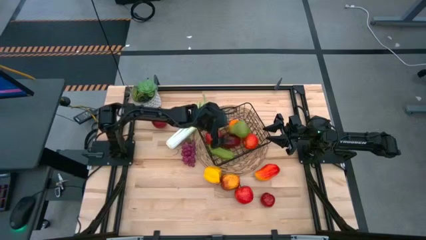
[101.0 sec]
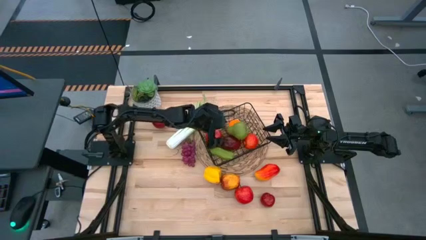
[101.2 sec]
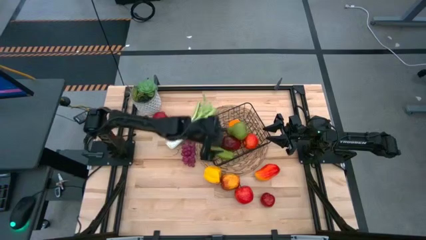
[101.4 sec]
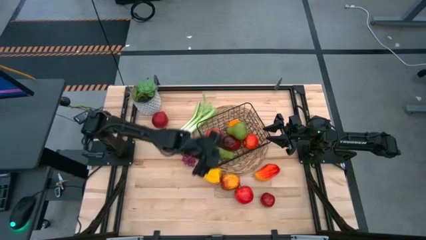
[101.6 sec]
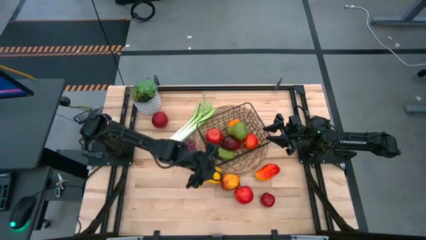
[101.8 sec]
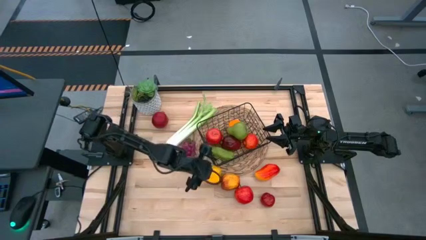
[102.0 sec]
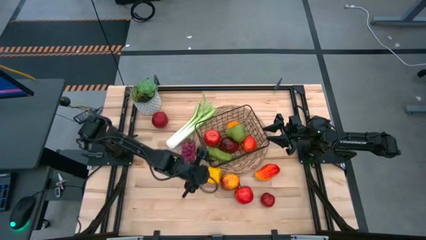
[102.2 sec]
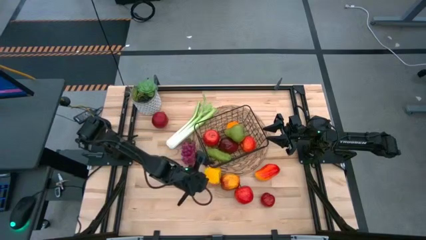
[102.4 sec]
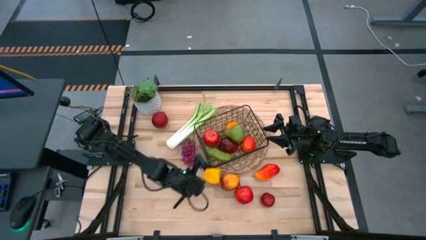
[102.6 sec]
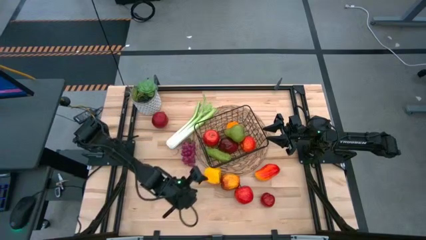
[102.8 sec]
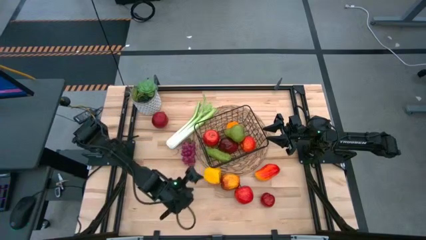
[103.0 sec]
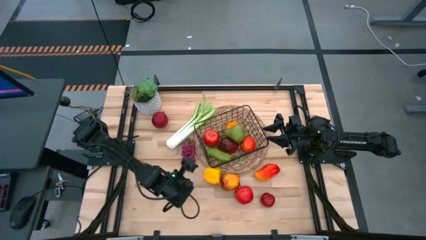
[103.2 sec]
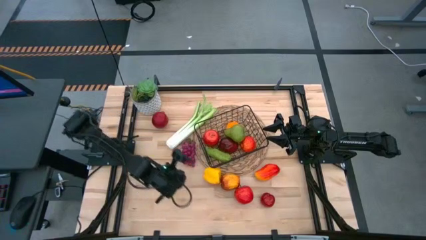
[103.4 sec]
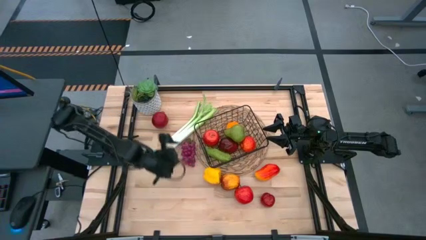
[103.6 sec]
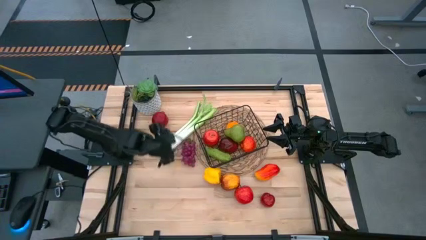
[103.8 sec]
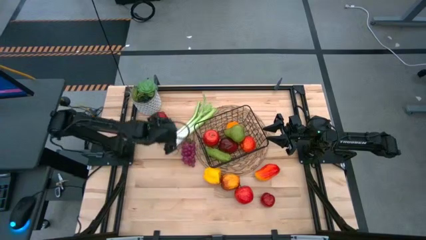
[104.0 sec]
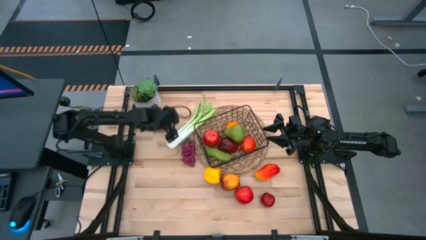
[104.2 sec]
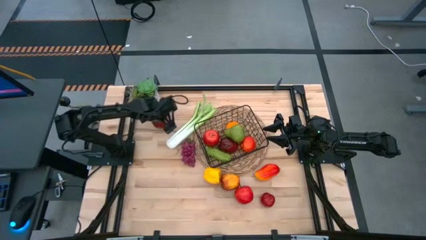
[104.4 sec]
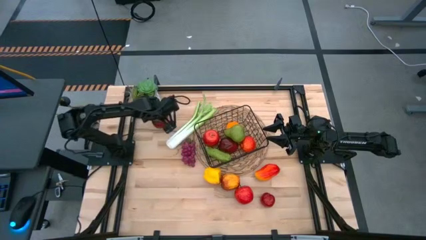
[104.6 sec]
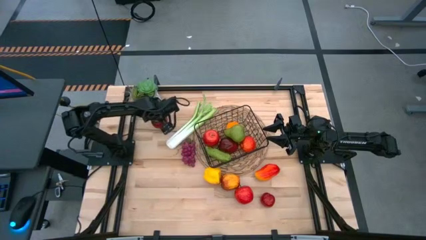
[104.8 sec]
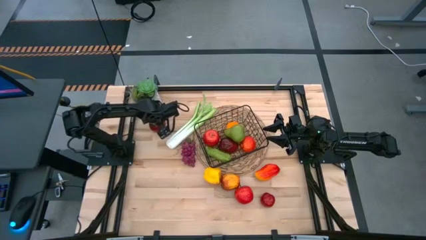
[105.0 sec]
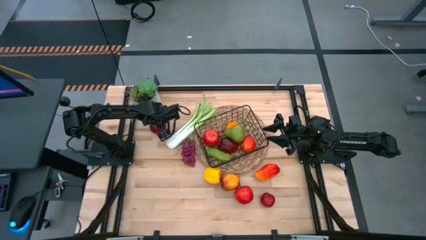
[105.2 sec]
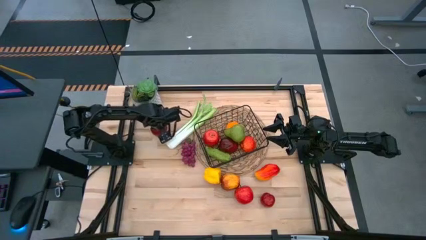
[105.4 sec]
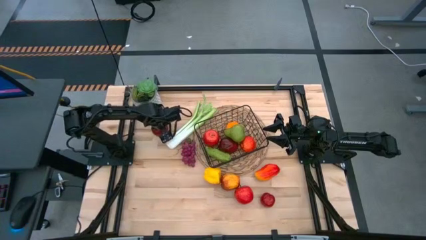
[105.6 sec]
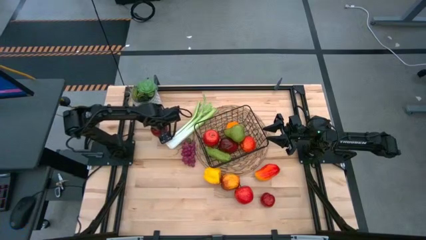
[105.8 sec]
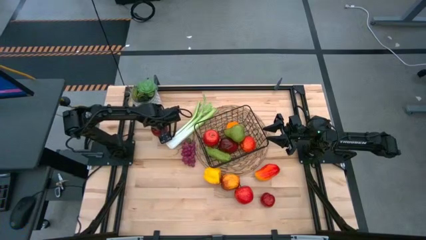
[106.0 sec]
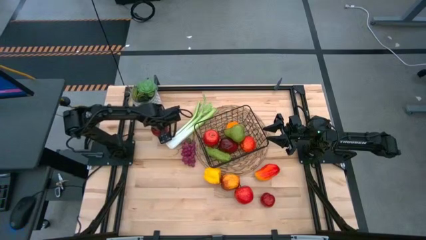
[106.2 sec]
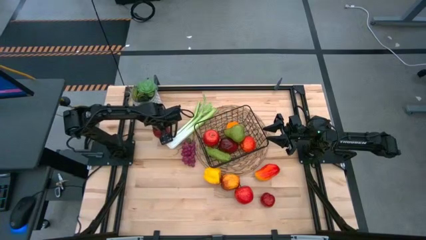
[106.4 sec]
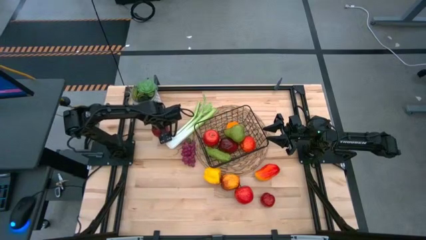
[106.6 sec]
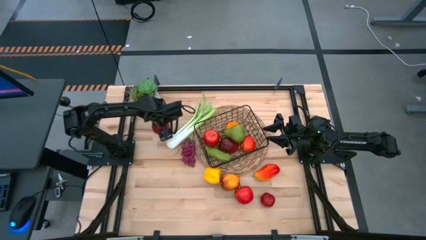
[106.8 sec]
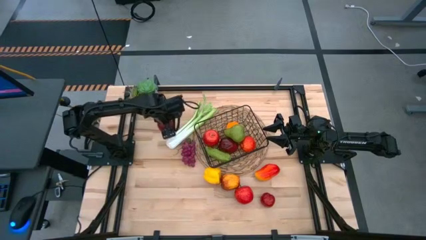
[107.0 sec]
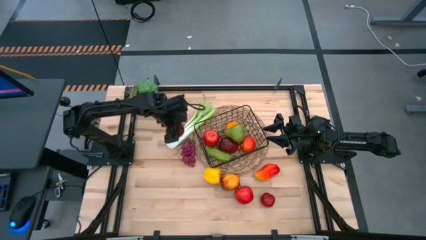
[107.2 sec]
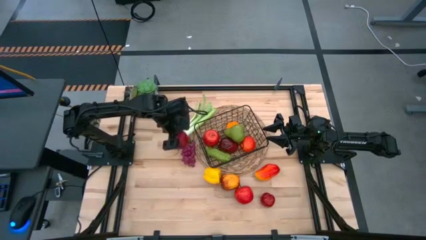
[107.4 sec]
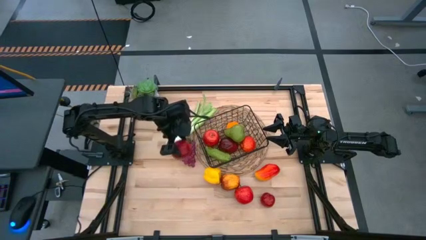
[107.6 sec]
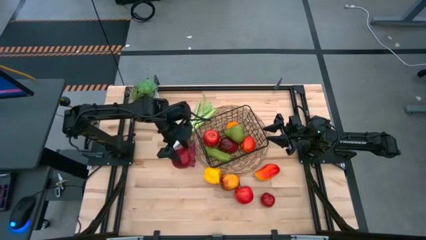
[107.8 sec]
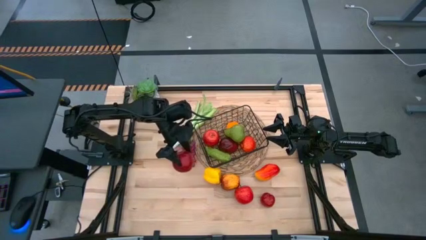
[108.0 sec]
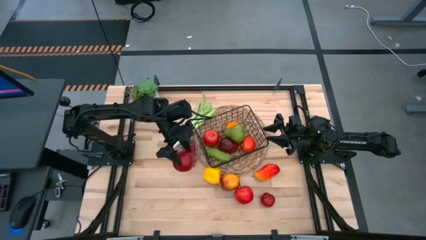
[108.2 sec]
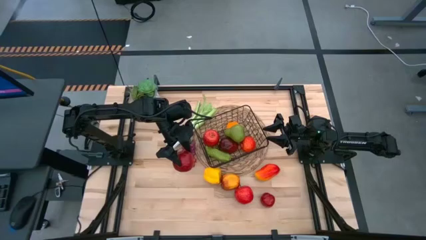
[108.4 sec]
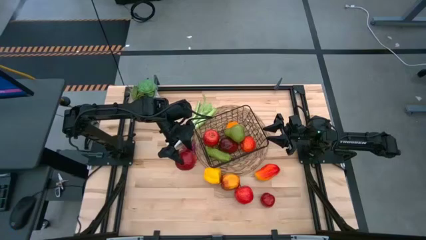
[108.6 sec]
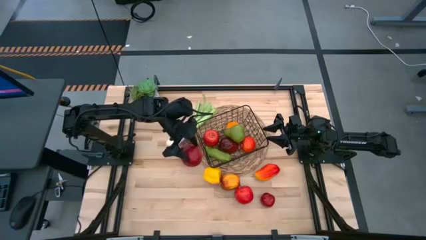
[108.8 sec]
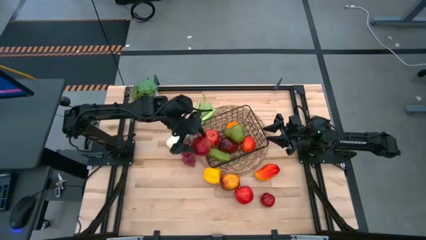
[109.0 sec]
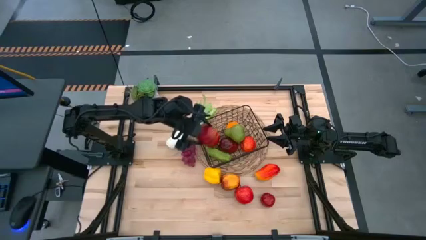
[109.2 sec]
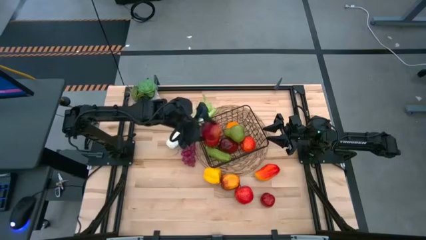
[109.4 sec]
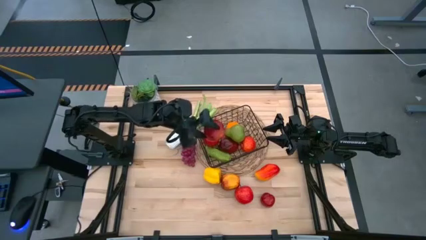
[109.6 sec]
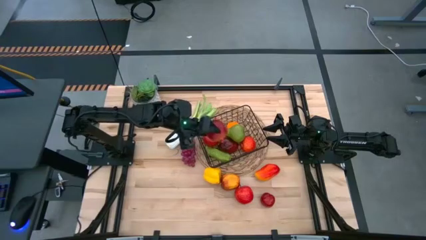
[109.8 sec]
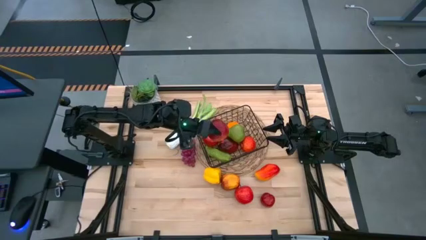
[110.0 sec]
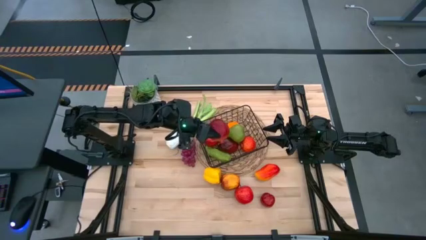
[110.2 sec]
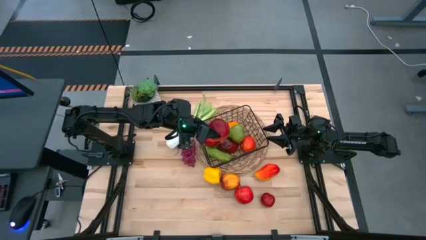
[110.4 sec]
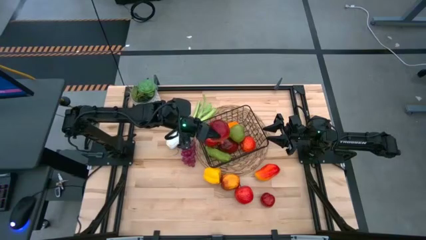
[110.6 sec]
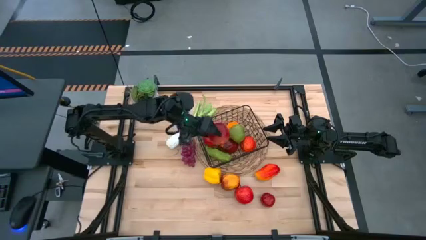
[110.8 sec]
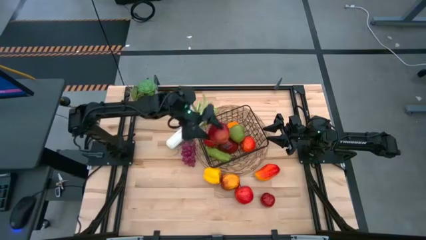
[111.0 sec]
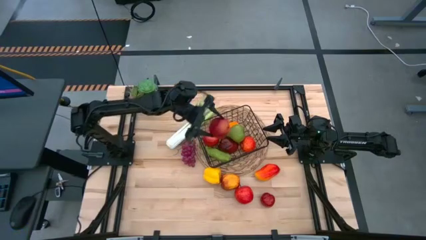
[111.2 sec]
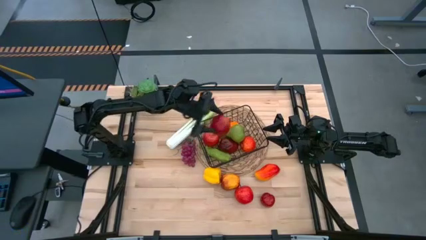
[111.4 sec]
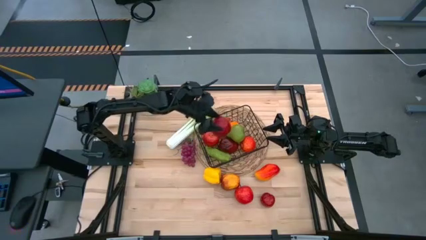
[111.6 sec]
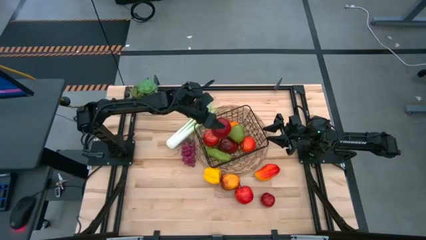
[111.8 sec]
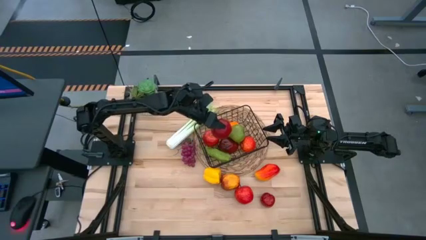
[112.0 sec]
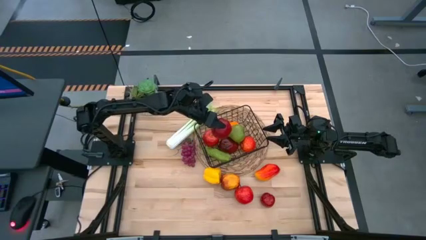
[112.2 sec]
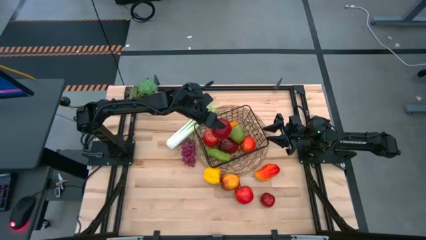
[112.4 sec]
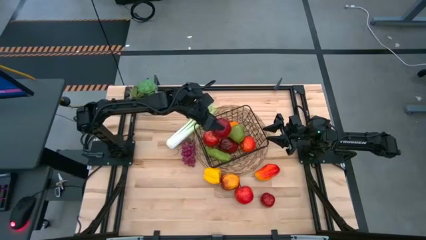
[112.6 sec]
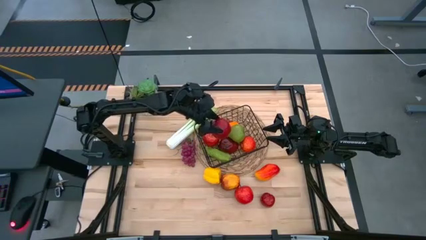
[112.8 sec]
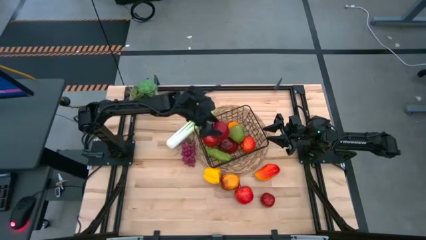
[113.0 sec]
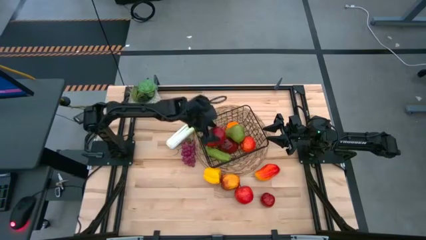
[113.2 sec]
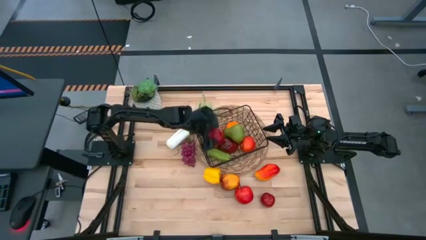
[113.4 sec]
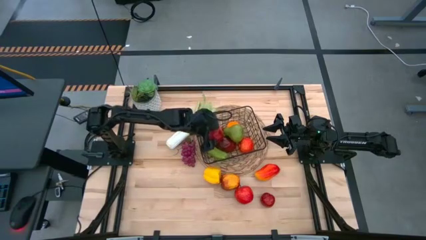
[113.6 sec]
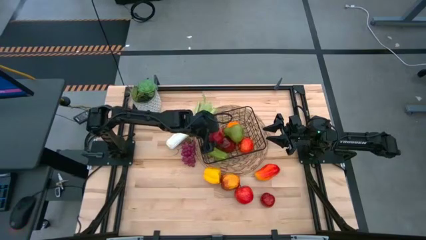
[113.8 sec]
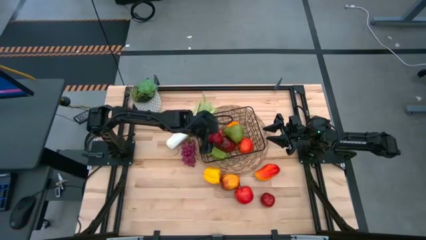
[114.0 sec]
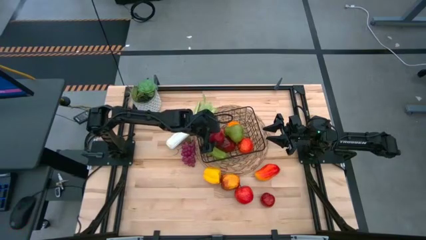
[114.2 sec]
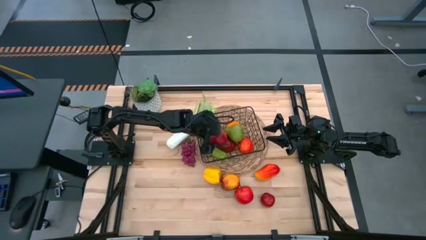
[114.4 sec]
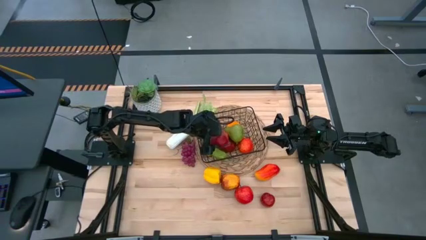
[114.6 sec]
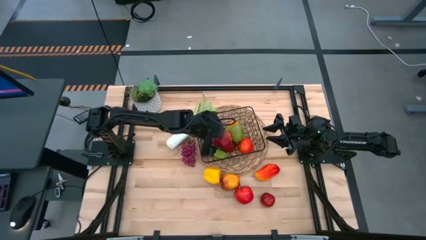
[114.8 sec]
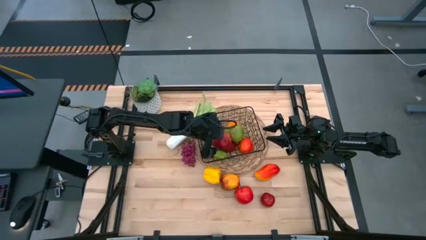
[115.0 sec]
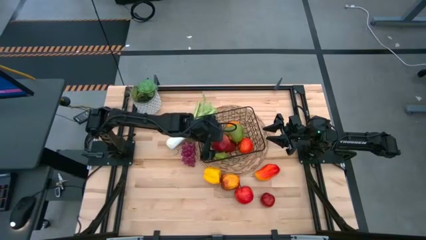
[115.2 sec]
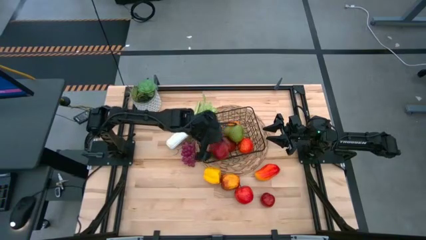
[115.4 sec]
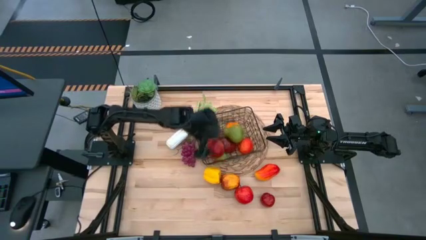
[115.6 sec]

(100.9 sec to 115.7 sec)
Task: Build produce basket
Put the red pomegranate into the black wire basket
